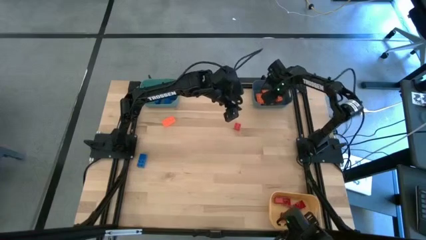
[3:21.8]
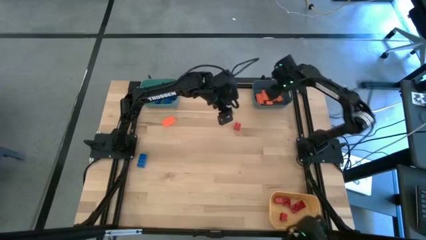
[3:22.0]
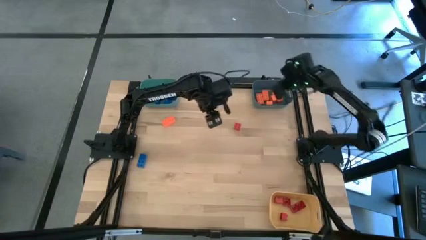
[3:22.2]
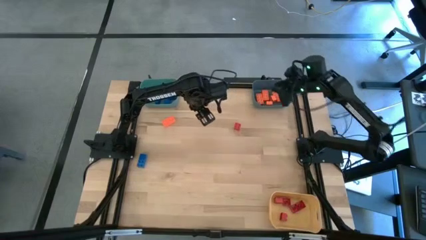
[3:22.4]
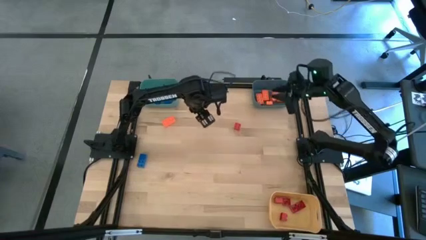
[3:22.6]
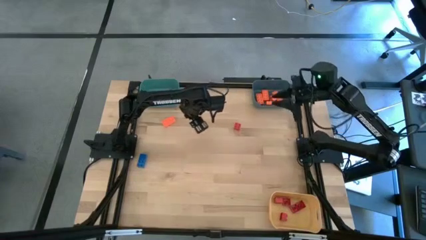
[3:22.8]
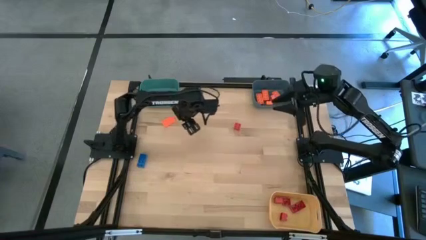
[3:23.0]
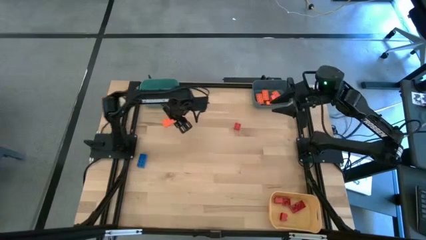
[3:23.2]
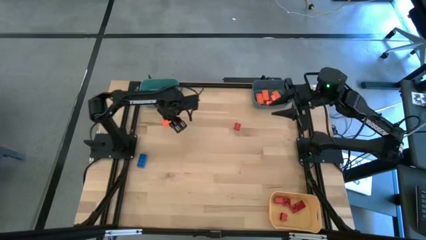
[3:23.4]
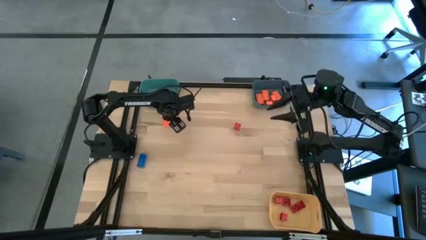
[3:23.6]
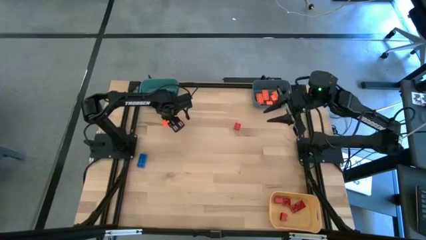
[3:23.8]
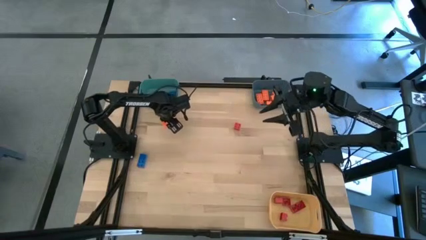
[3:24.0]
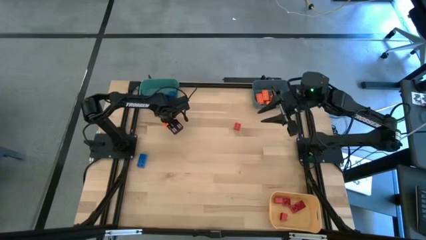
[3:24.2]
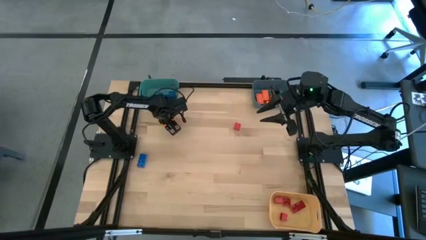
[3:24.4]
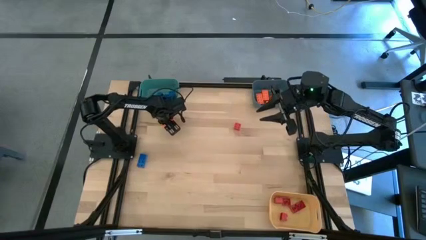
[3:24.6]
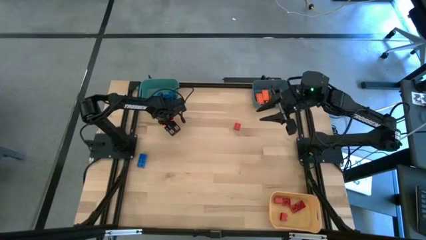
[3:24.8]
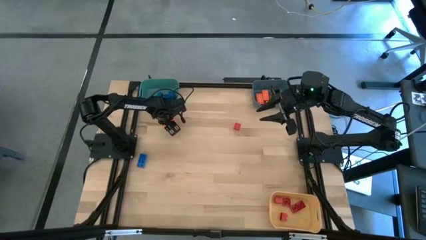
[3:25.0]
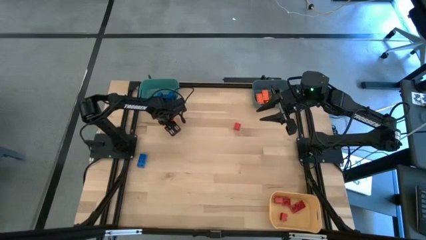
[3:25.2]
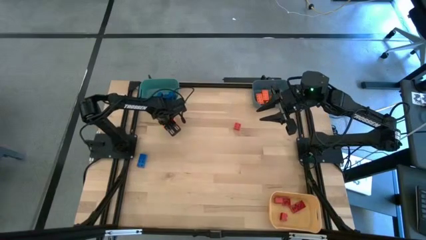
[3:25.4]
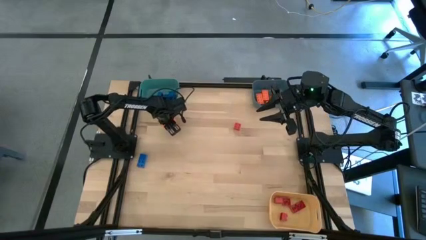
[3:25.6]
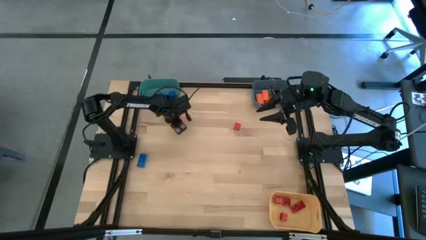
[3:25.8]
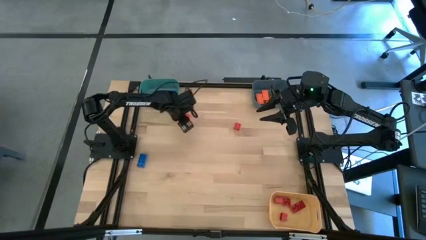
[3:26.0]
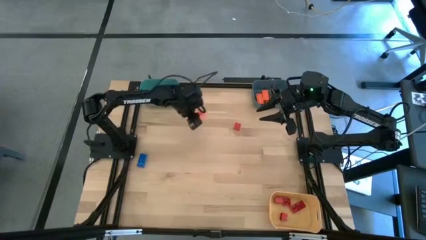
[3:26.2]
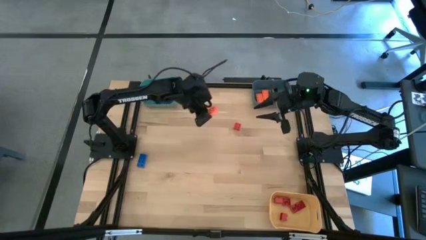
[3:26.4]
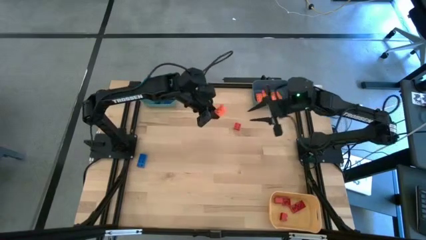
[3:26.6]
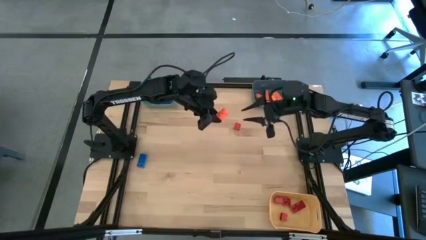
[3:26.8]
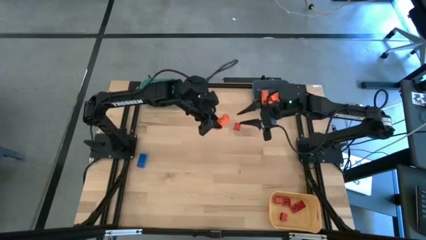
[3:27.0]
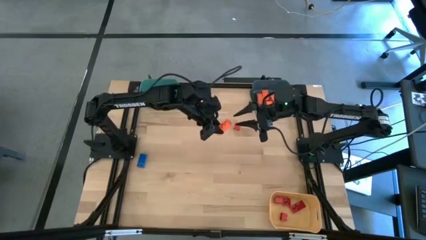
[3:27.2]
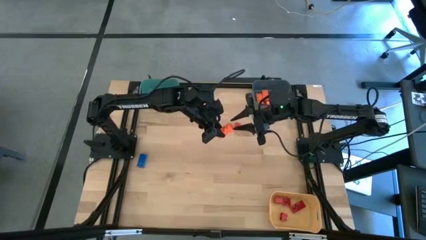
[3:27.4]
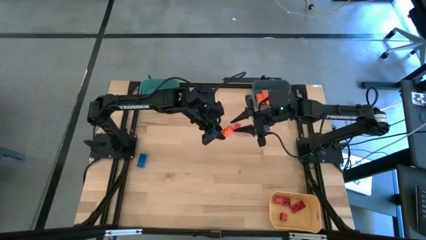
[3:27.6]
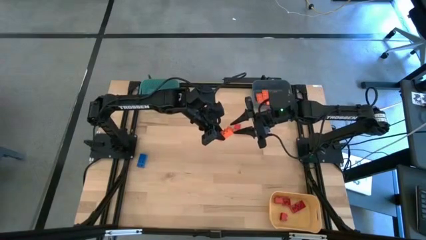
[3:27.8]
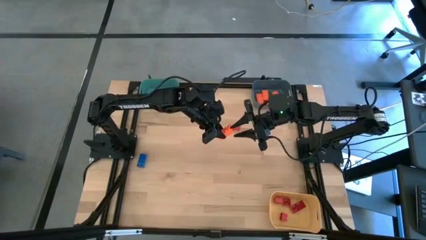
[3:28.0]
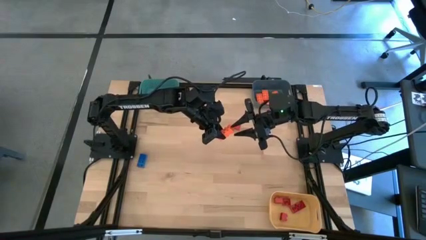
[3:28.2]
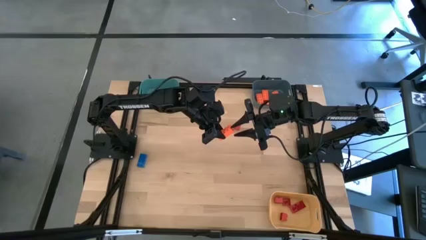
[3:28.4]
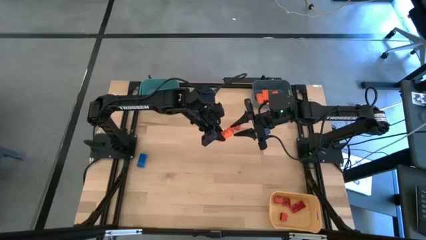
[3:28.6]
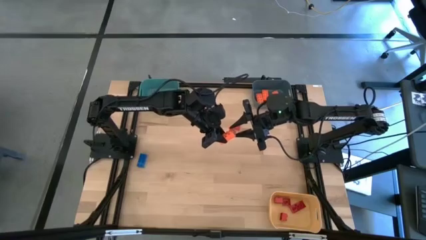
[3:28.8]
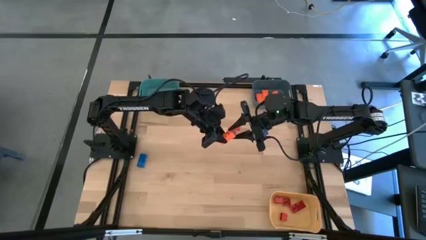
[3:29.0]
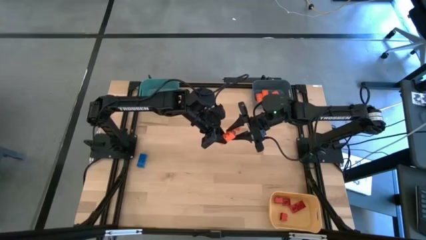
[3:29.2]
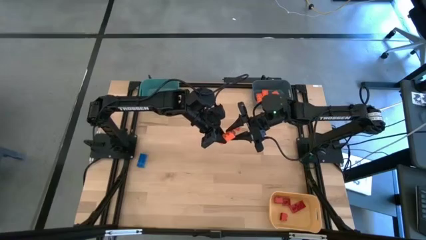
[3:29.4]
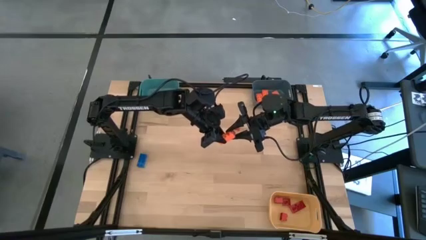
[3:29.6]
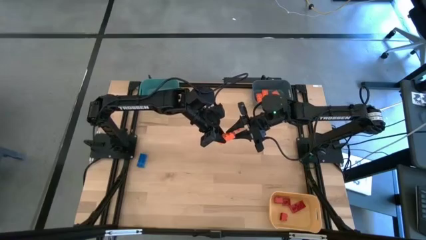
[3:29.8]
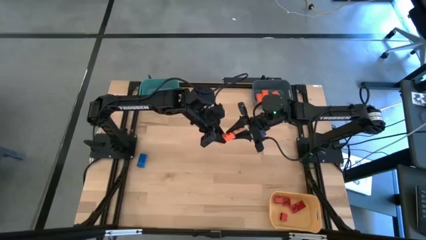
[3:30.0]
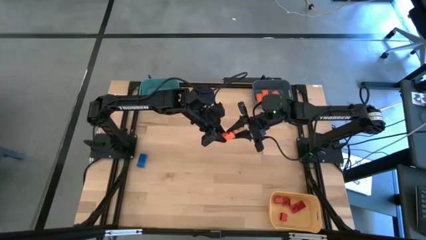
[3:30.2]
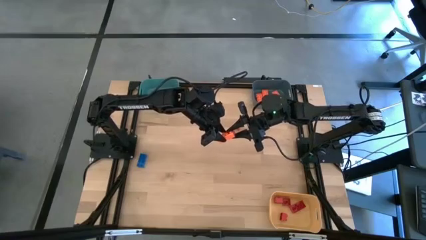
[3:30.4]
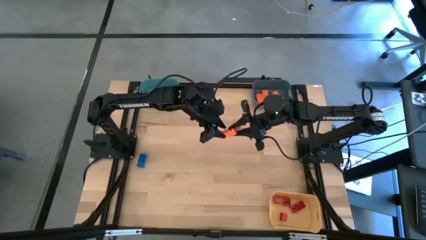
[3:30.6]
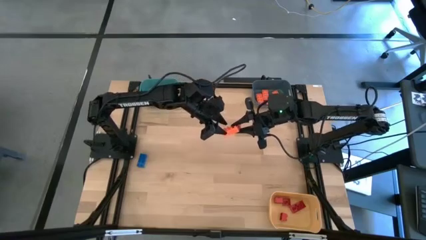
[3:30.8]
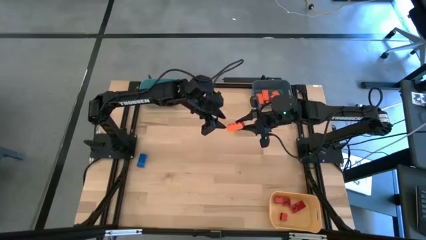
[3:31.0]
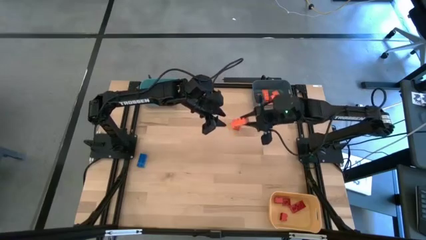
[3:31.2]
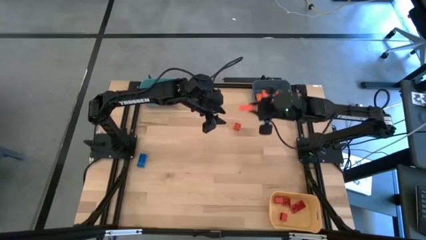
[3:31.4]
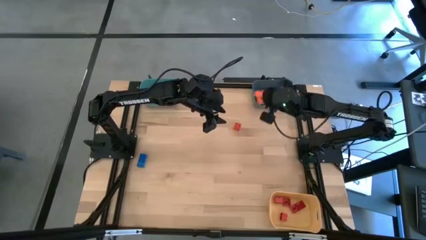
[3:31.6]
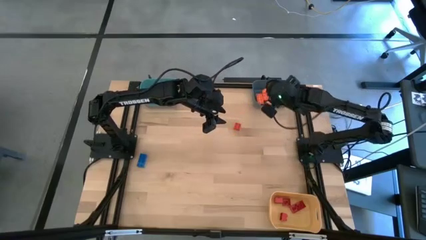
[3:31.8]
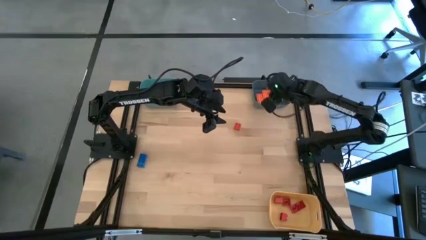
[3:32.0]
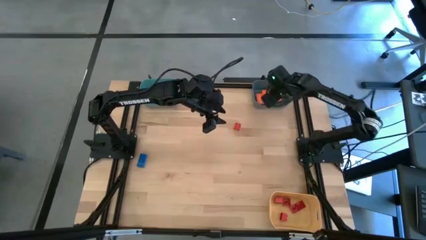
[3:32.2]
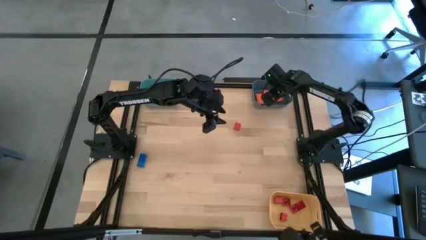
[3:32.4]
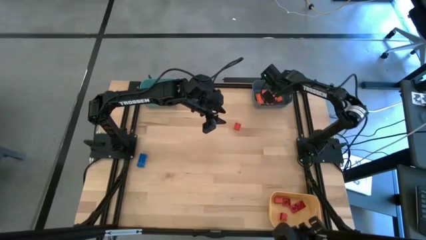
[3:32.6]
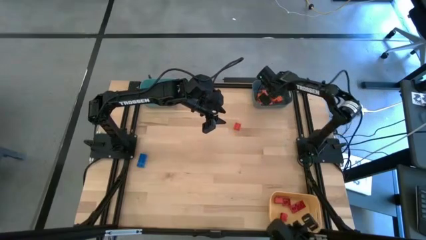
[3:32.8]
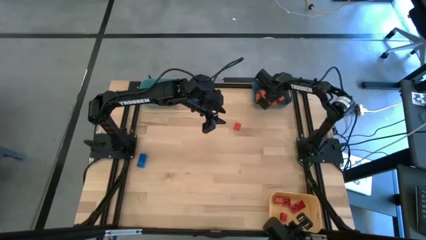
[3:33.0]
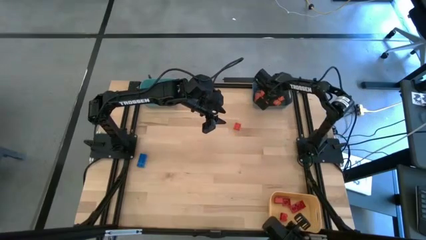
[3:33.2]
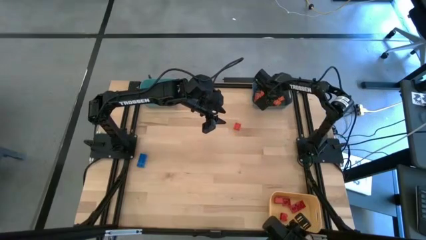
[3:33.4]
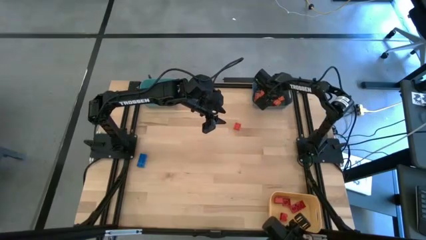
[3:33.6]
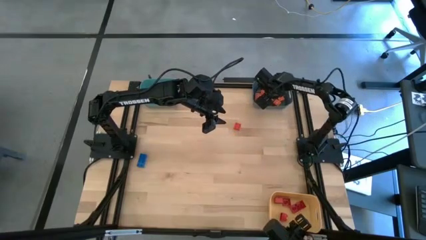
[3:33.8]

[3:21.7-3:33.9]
Task: Sort & place blocks by color
Put the orange game piece into the blue bin
